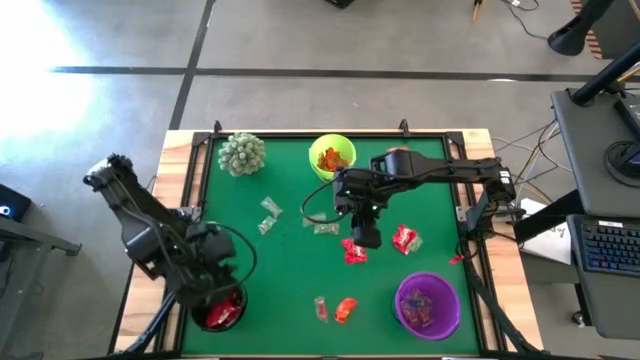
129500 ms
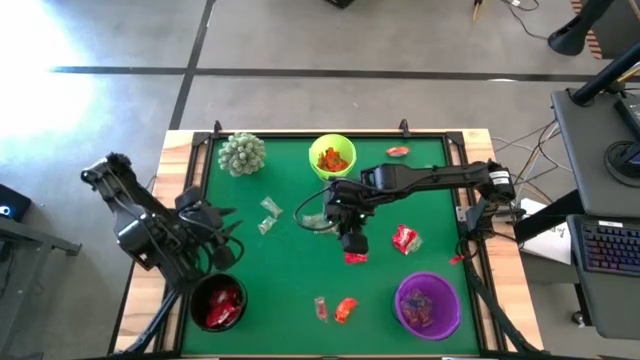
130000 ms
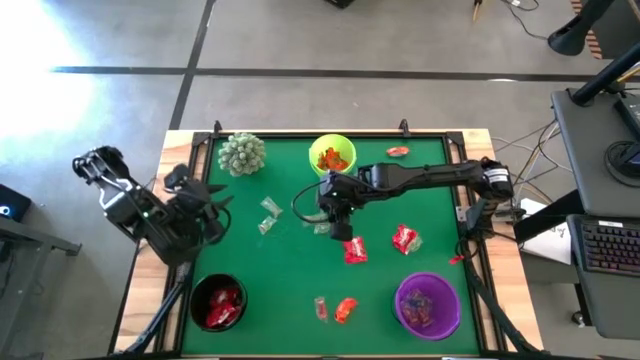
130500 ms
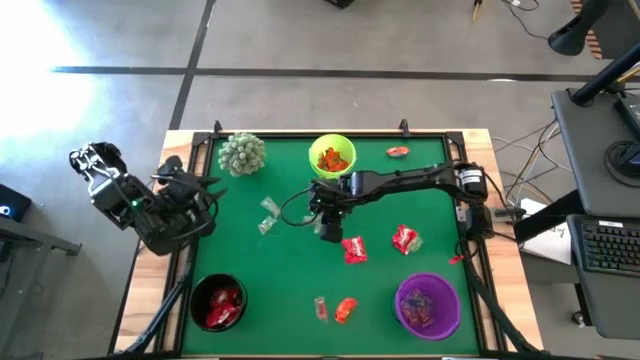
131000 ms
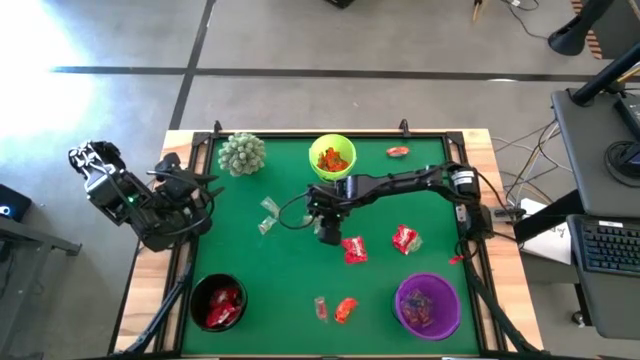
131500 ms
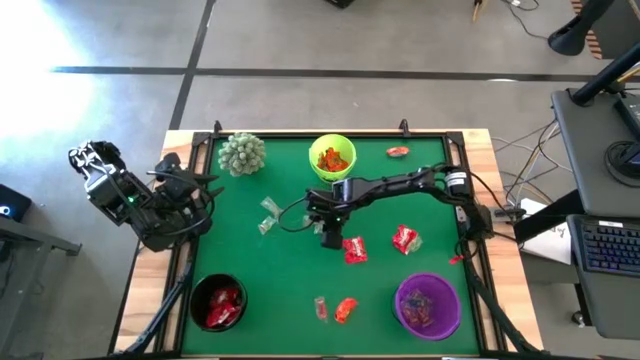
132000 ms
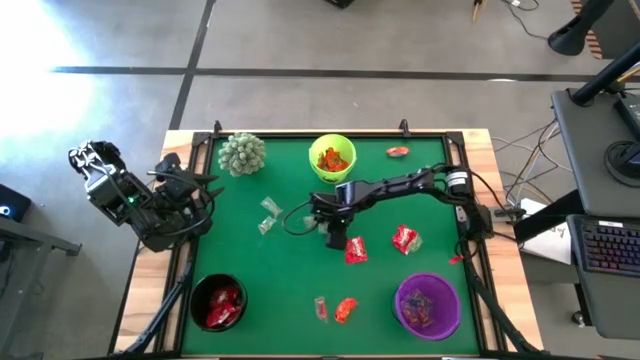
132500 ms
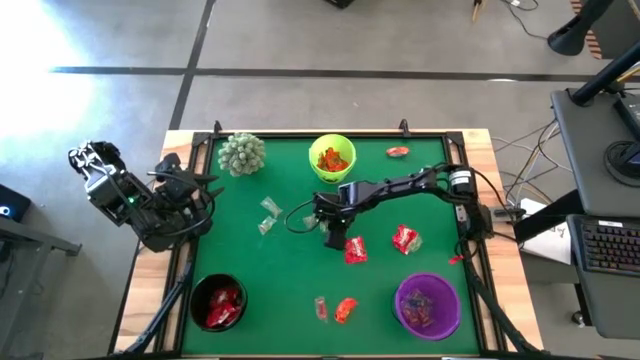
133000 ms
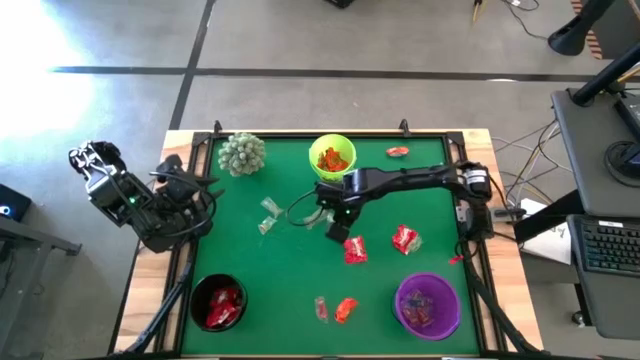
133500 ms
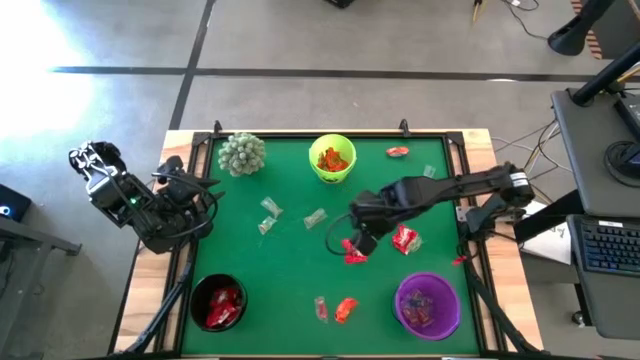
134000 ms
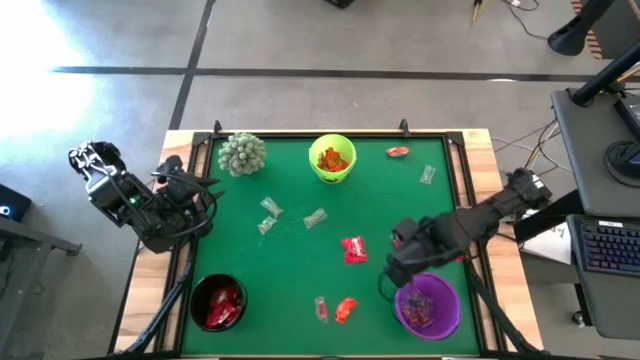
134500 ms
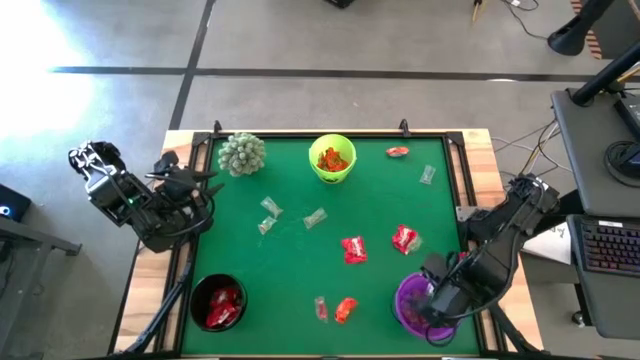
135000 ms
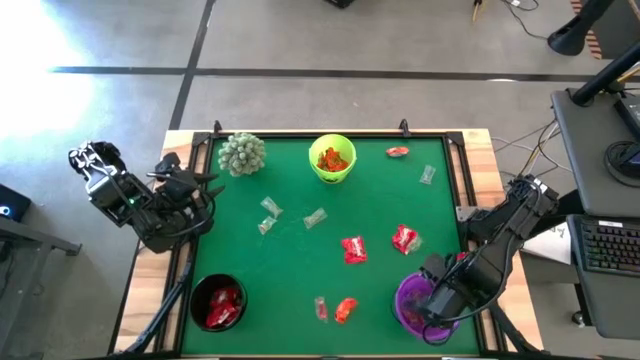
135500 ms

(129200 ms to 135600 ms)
Task: Organize candy in baskets
Put the green candy into the violet bucket

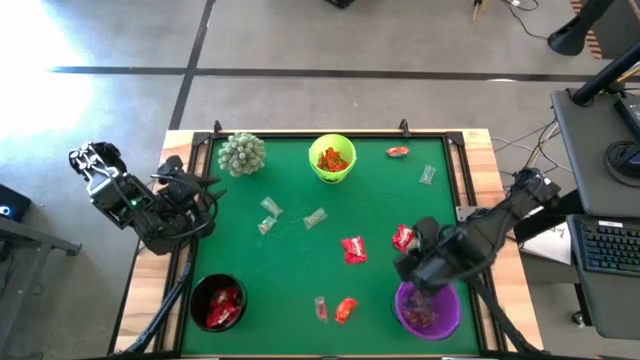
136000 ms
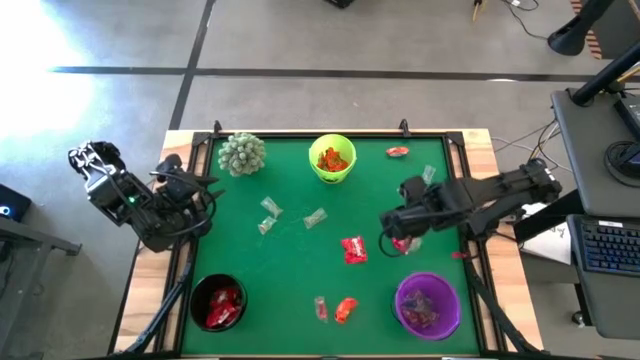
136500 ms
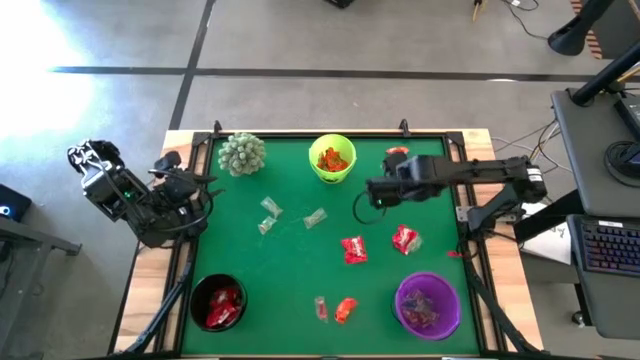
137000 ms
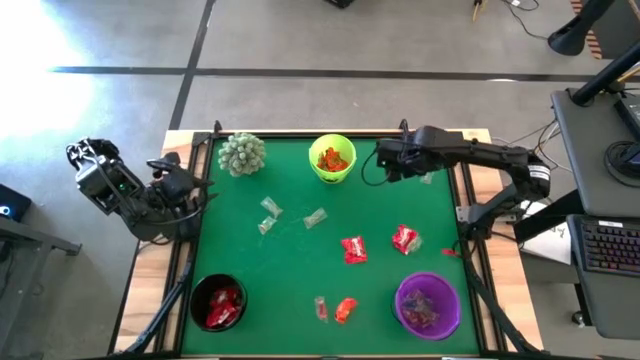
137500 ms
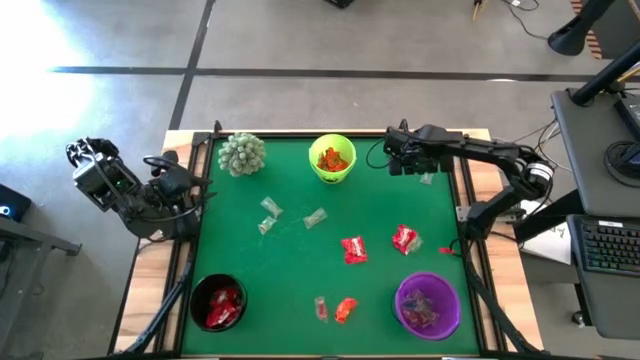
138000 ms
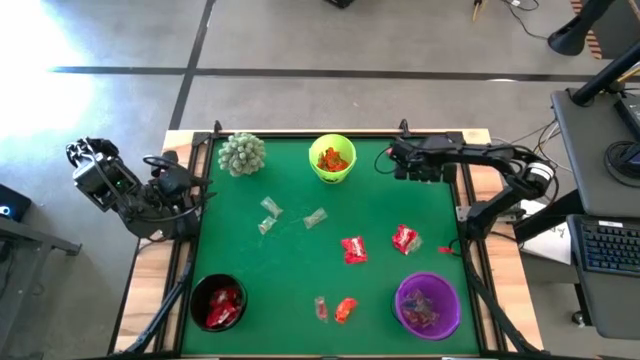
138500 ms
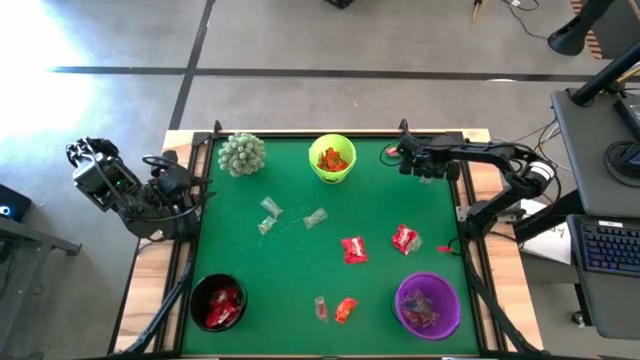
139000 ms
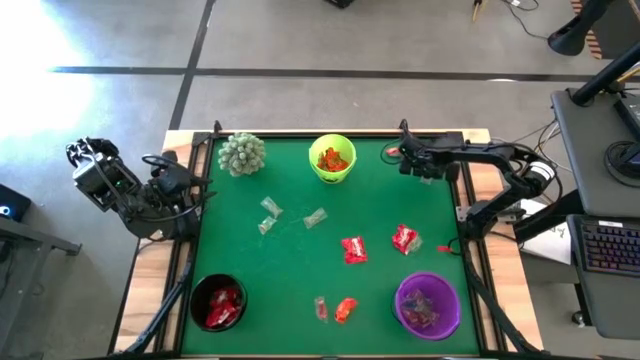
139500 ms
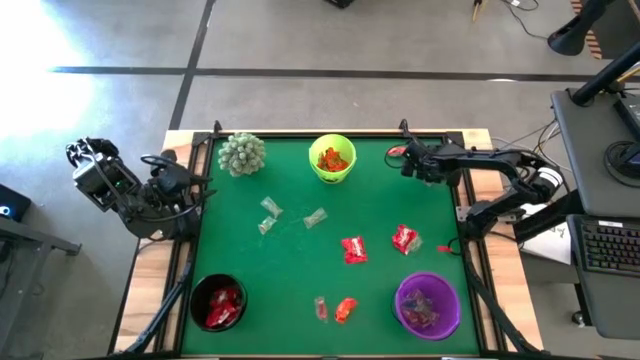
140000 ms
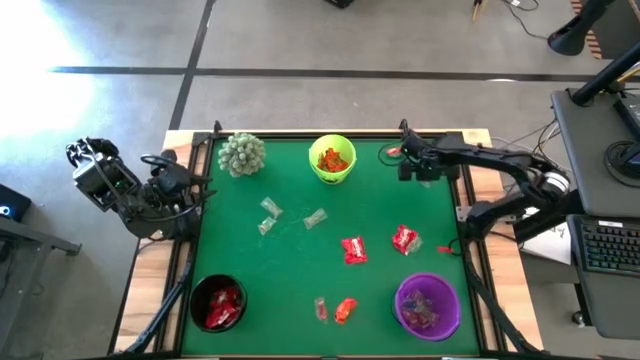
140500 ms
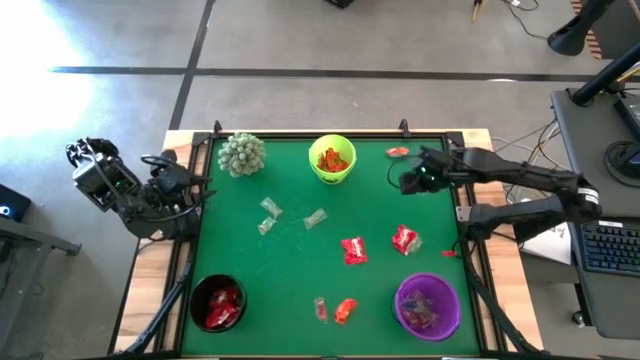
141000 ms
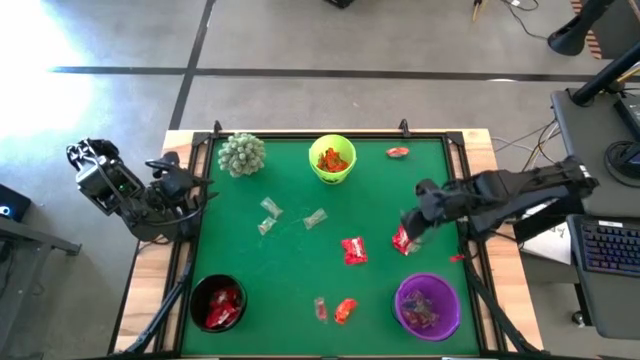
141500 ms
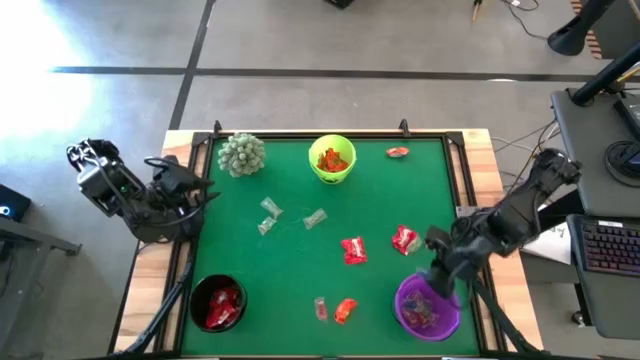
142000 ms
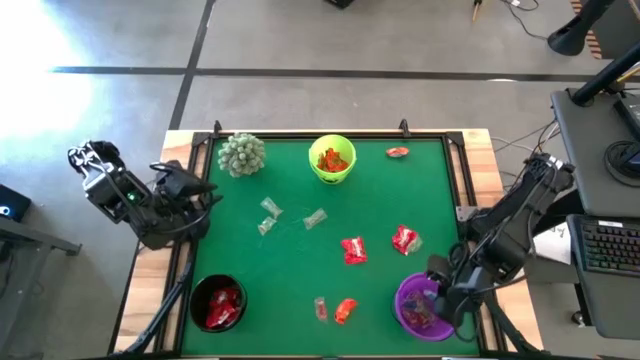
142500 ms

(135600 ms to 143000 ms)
Put the blue candy into the violet bucket

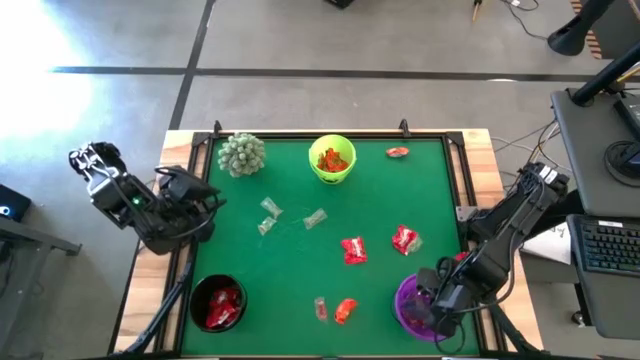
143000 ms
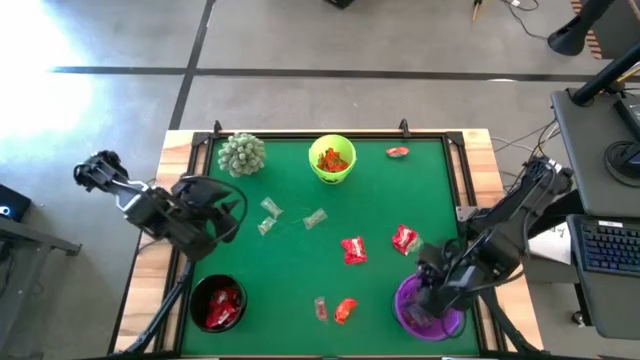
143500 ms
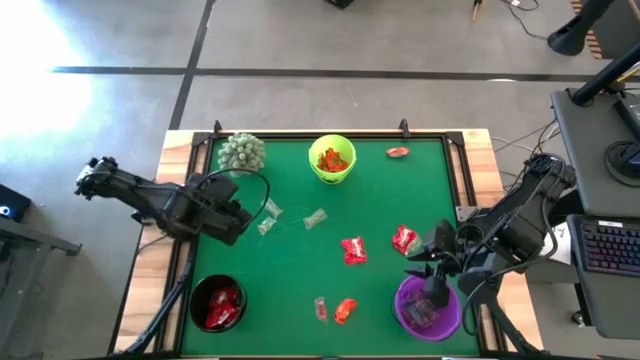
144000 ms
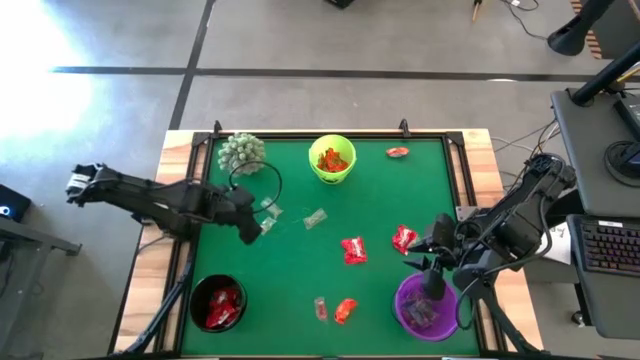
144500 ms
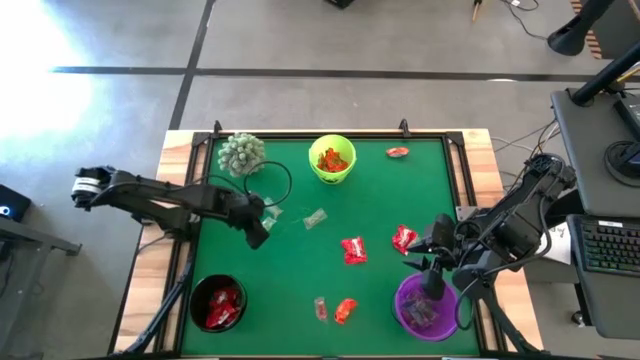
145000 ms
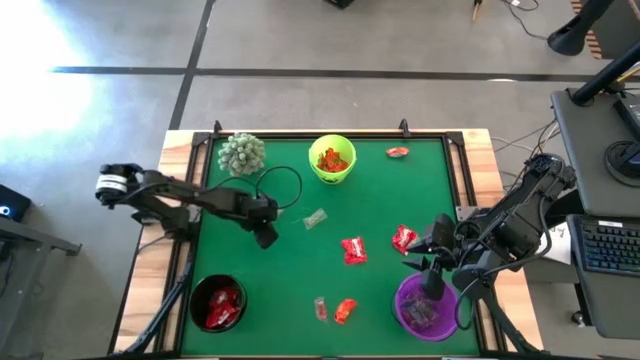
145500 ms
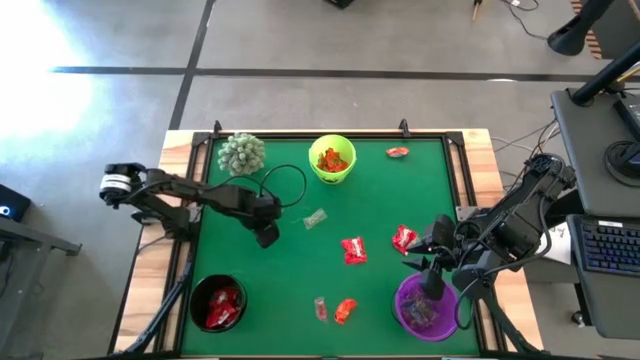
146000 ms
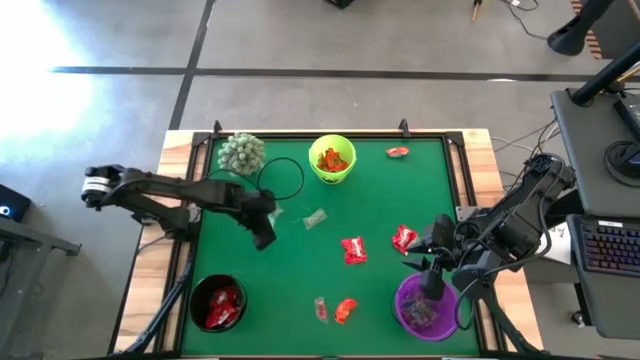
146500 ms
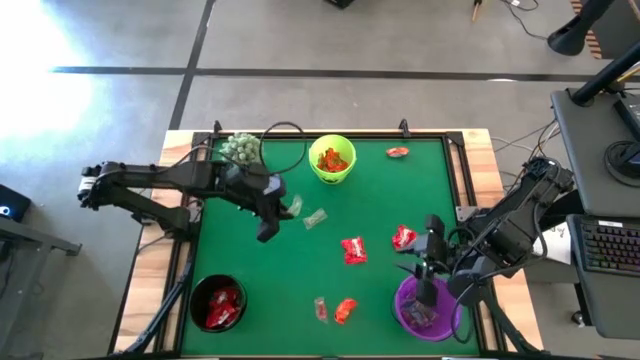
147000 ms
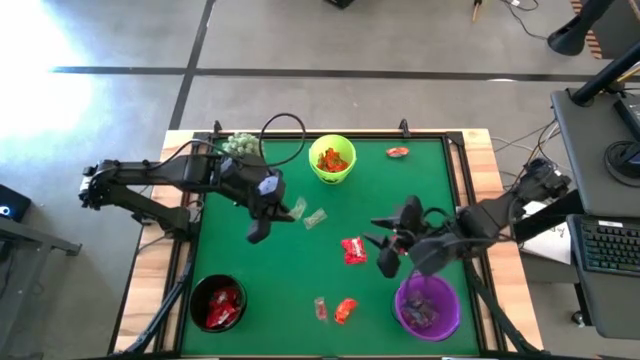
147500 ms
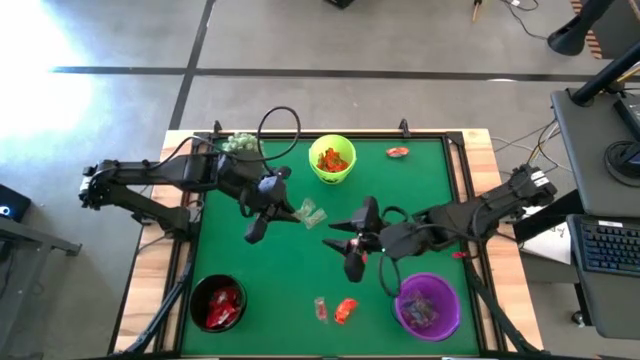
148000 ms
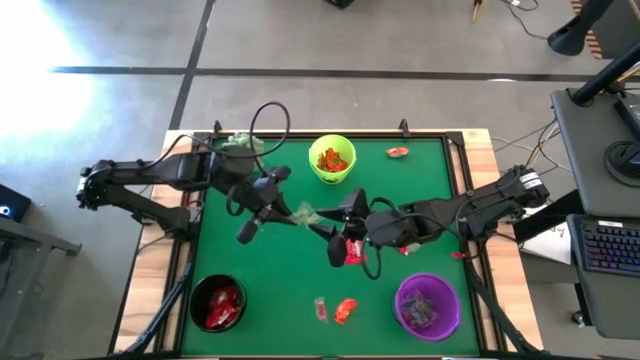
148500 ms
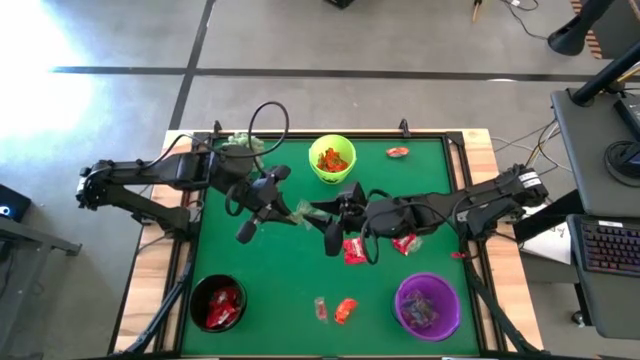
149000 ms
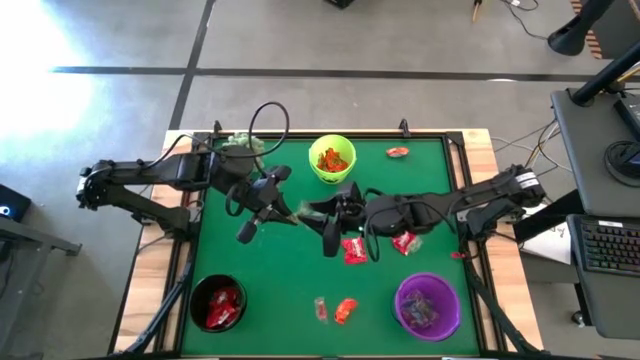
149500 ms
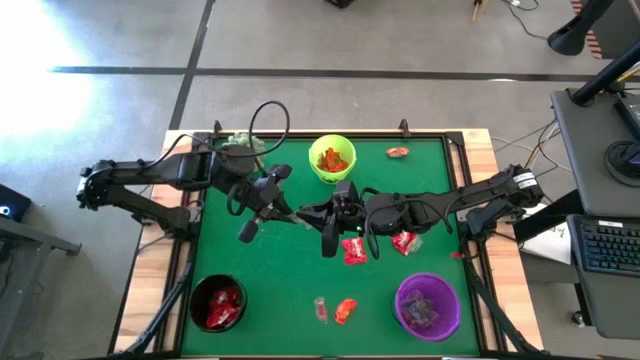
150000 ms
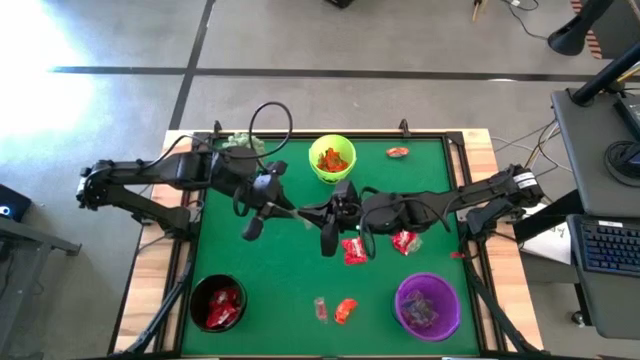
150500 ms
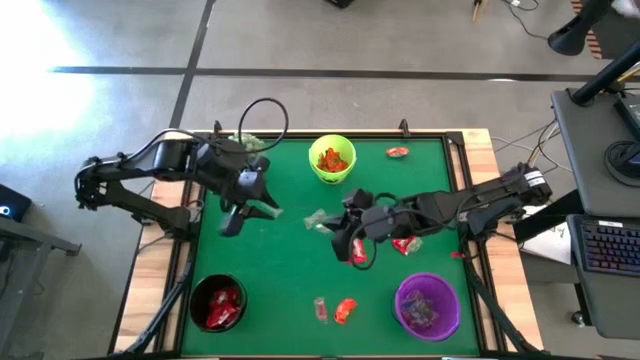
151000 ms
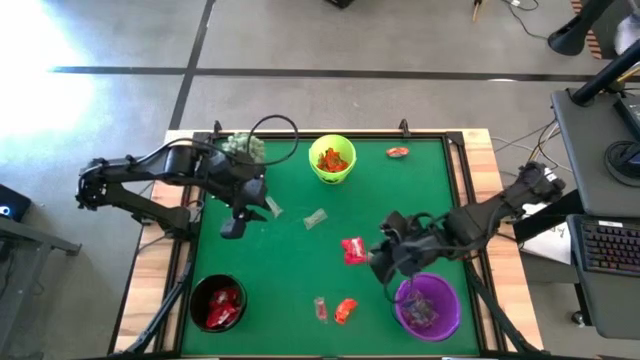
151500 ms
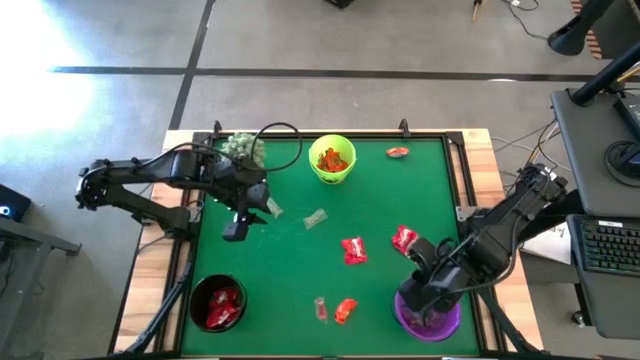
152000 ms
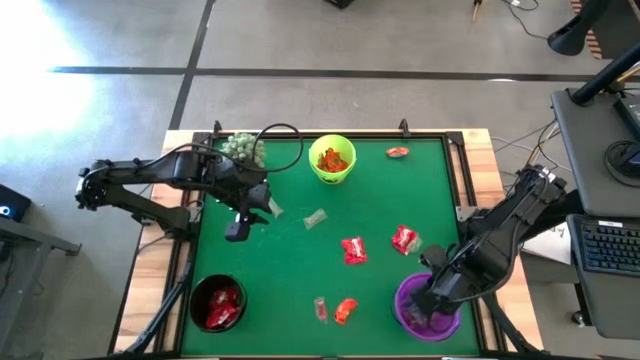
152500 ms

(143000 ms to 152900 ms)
Put the green candy into the violet bucket
